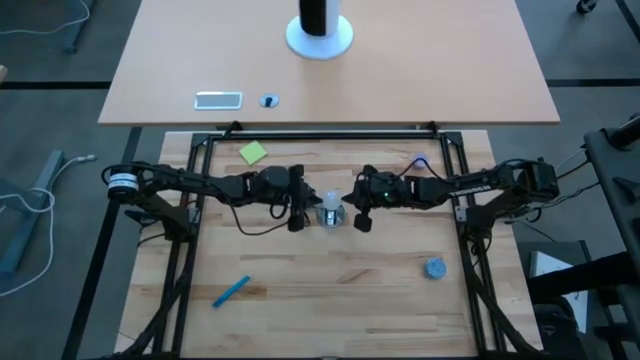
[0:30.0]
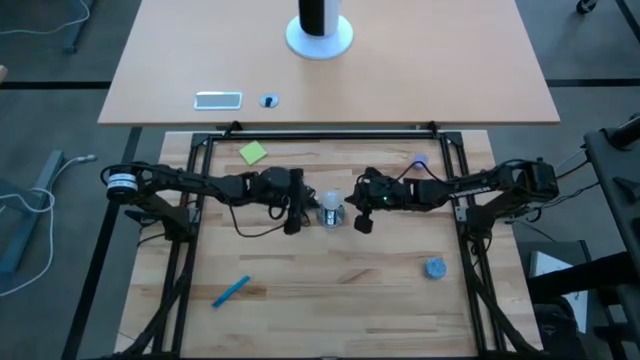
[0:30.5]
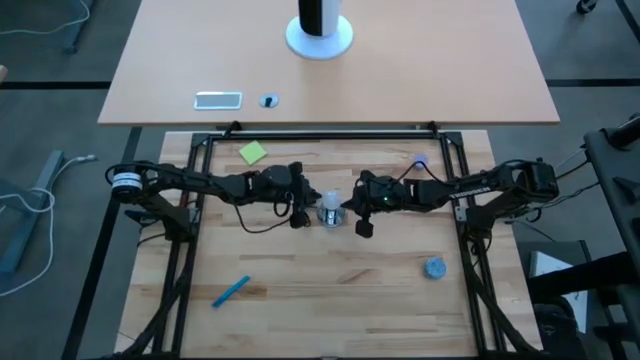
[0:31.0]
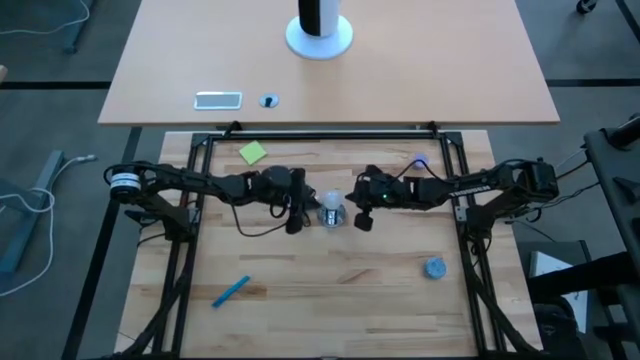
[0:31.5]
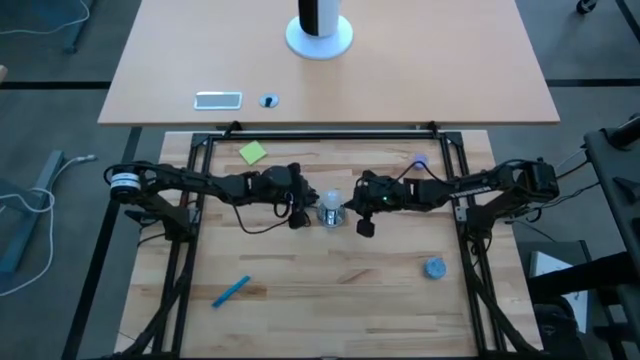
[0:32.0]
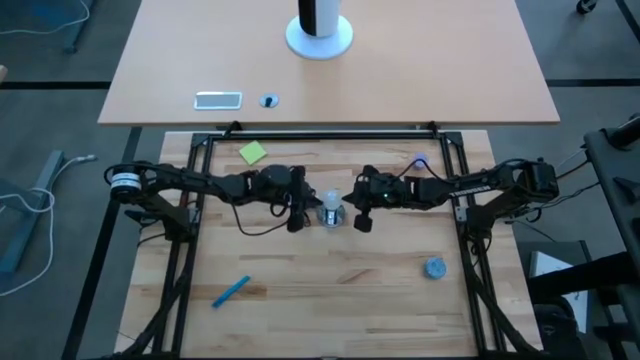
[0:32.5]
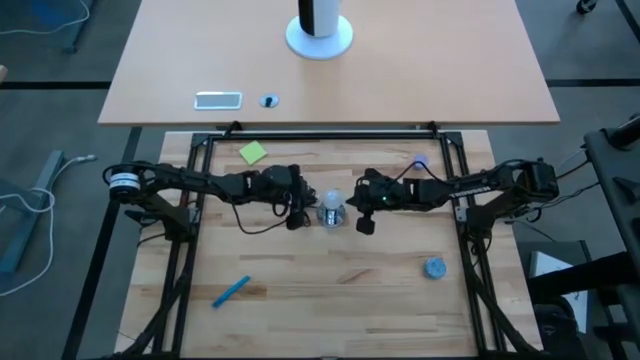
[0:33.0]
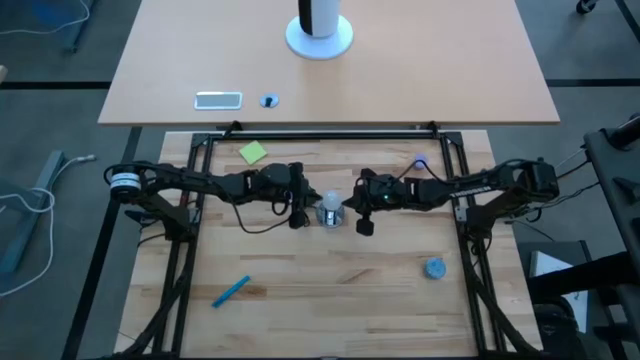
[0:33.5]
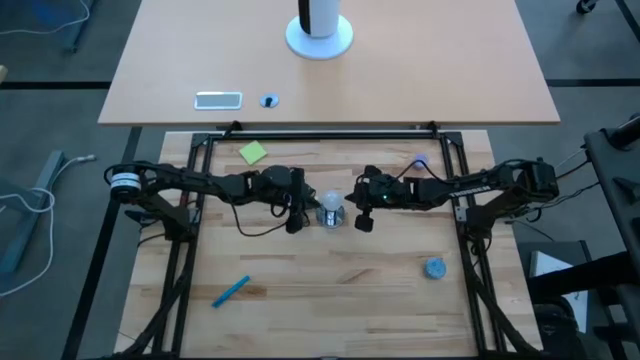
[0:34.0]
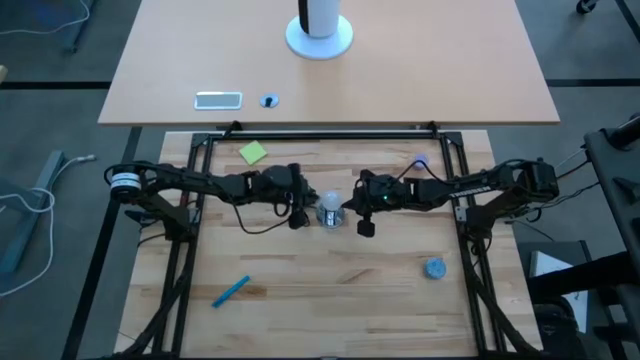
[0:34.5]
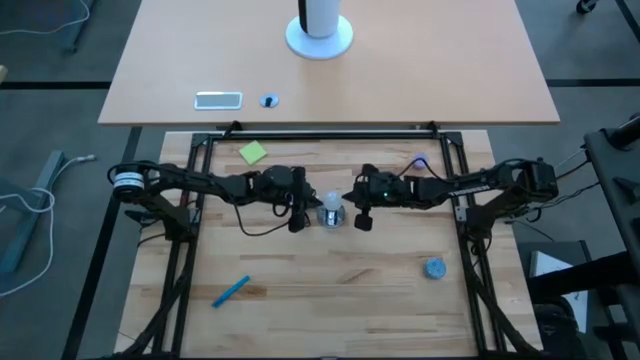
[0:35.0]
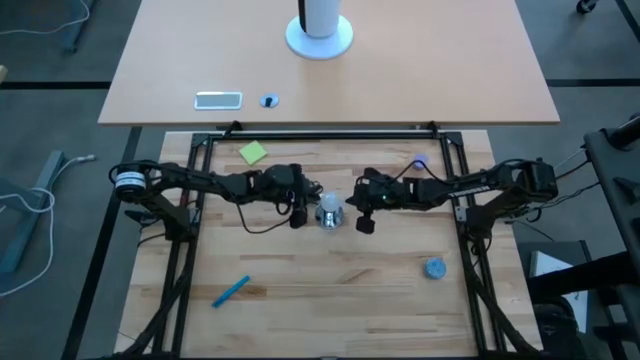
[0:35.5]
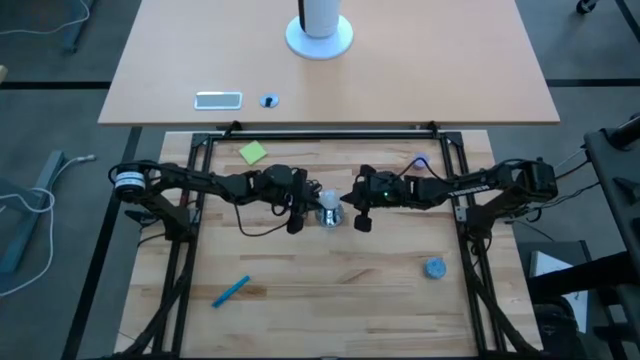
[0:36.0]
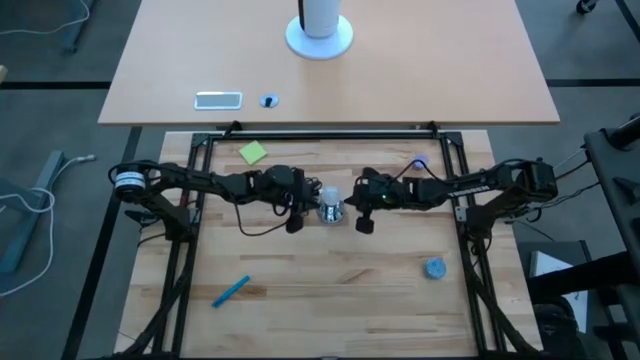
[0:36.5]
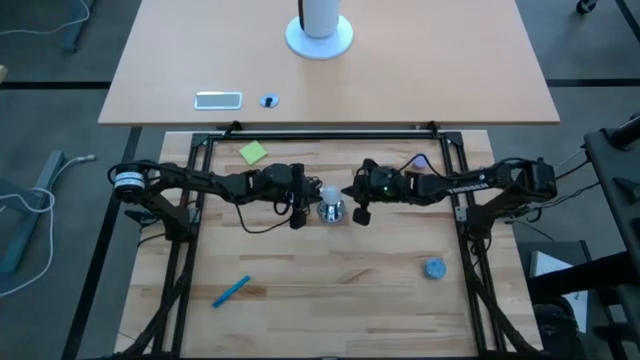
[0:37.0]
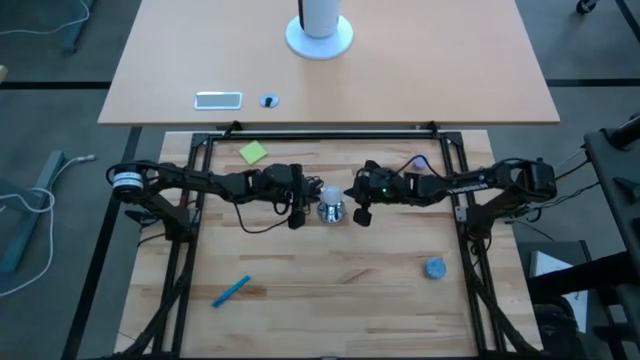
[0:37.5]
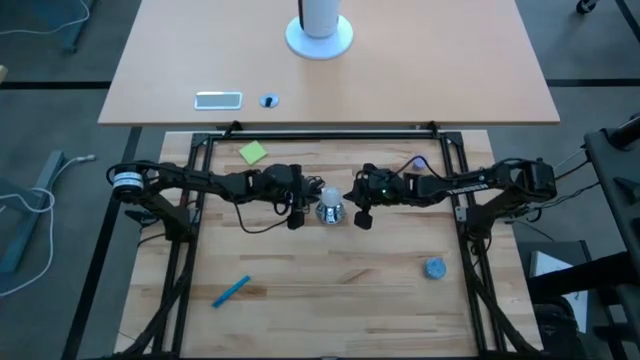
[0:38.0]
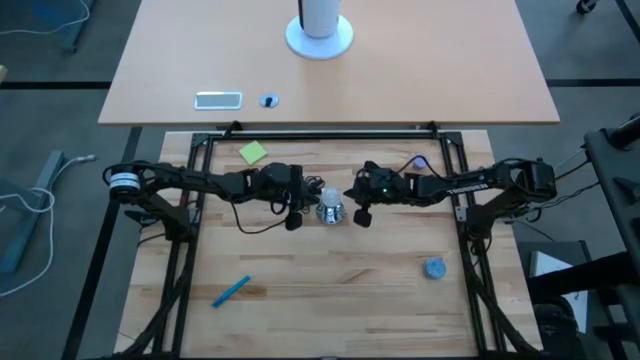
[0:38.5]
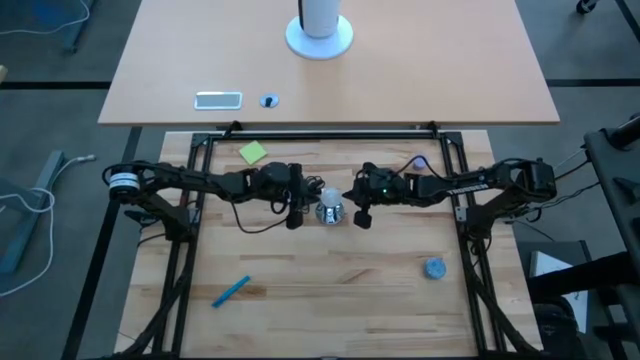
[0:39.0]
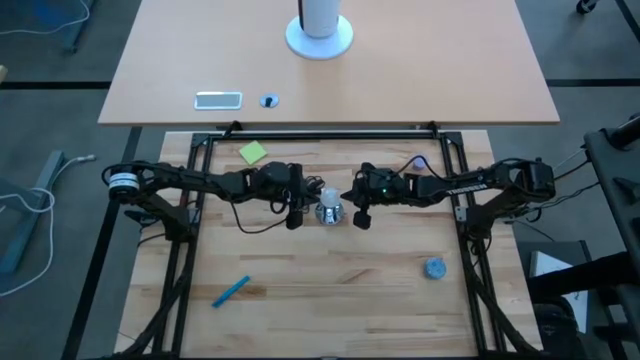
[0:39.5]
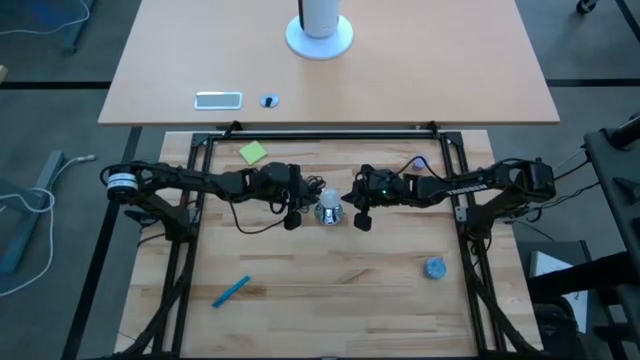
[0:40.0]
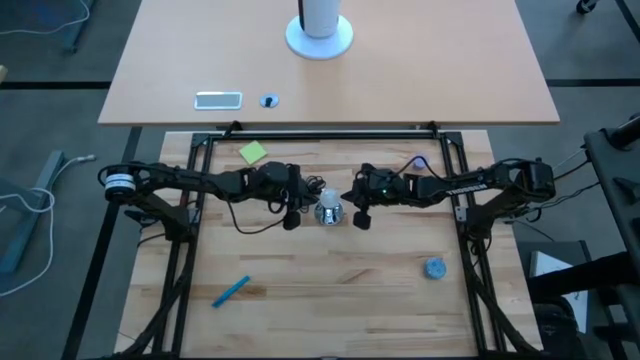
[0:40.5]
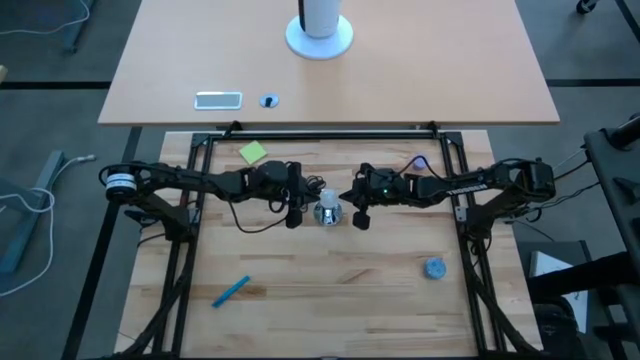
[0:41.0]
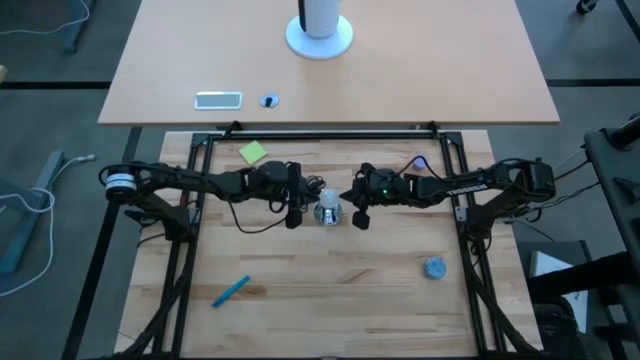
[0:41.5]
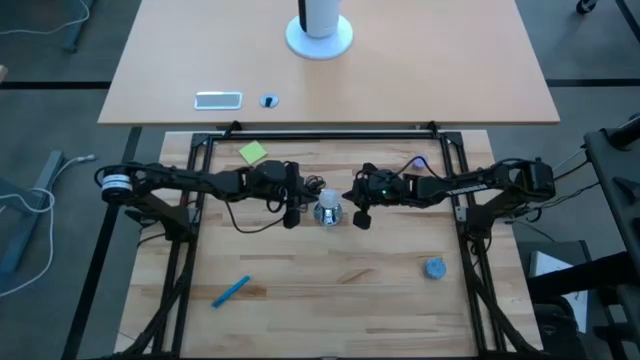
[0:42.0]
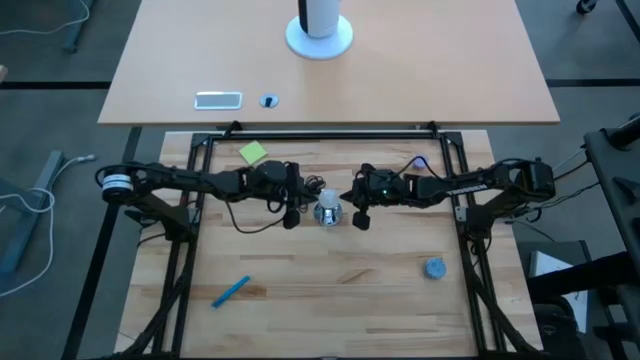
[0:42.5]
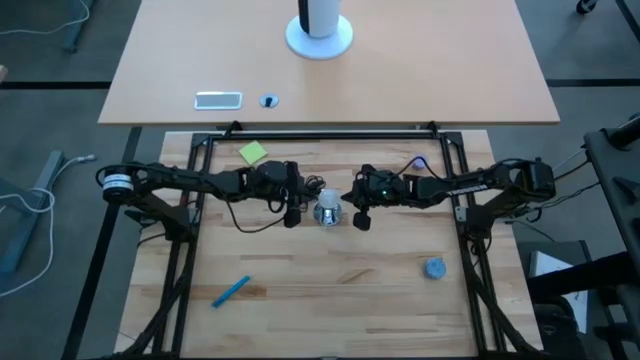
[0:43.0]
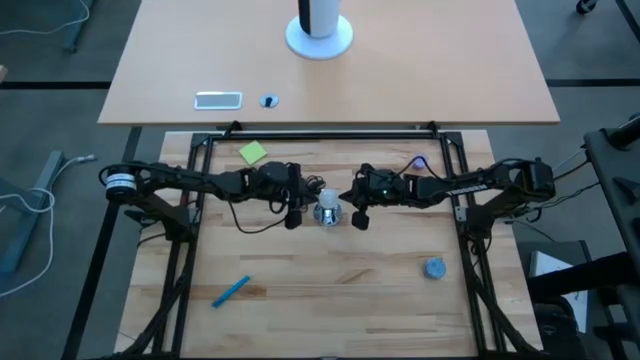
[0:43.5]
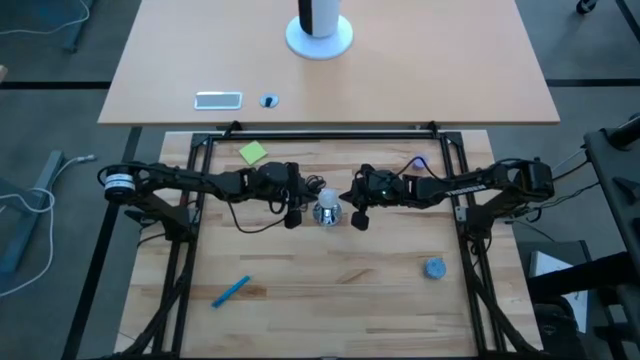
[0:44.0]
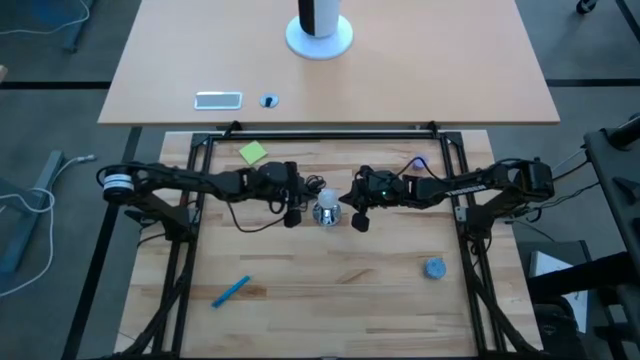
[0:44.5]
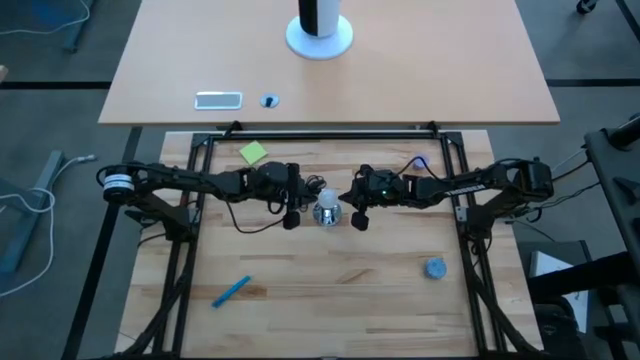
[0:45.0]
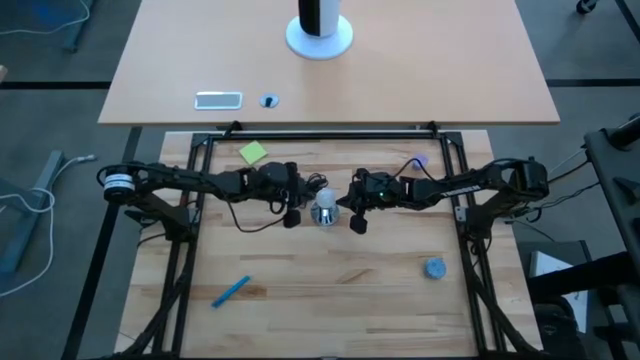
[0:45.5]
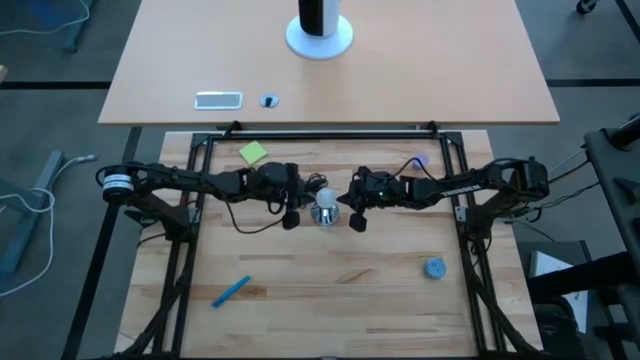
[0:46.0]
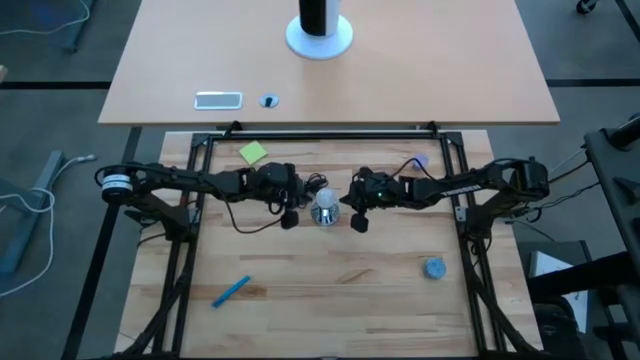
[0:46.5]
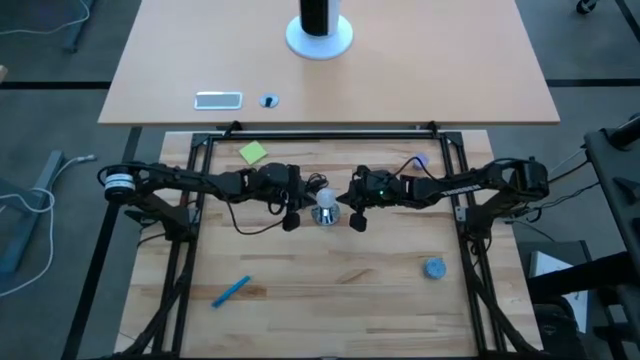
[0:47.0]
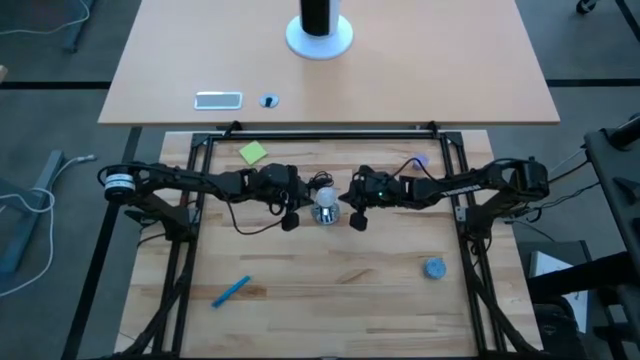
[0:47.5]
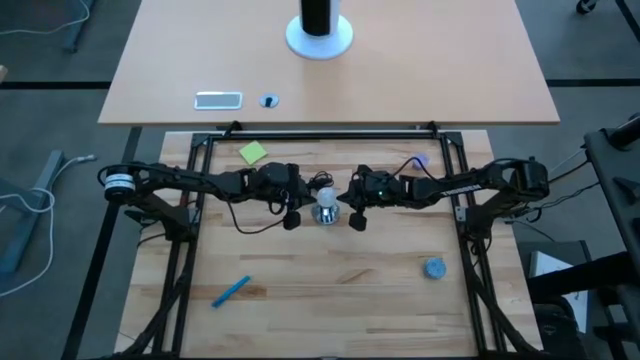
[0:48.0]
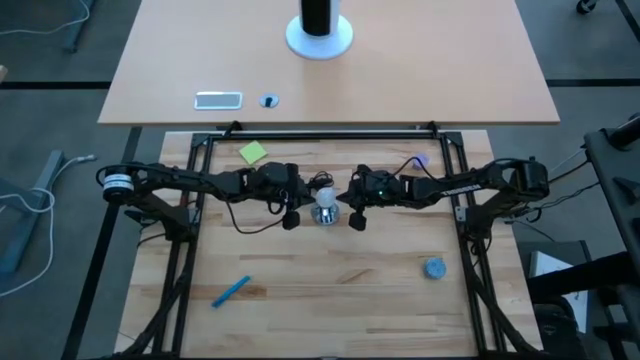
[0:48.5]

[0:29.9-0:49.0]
Task: Screw lightbulb
Insert the lightbulb into the lamp
